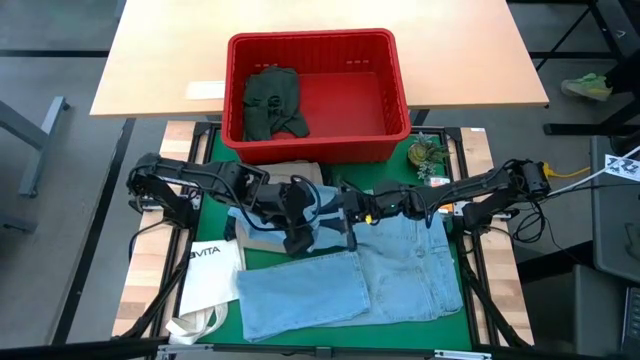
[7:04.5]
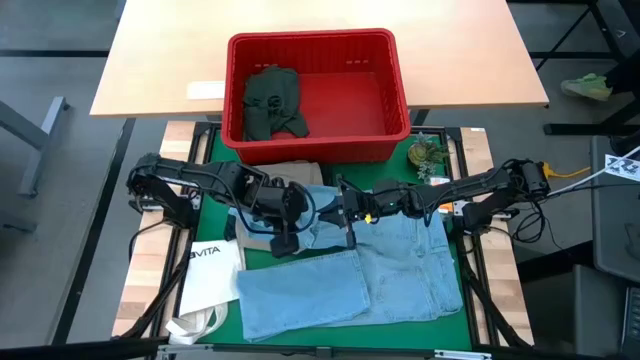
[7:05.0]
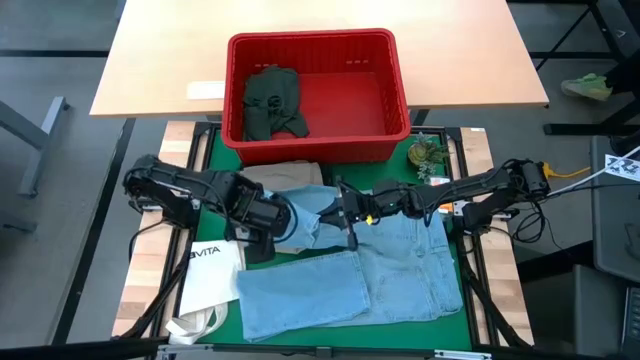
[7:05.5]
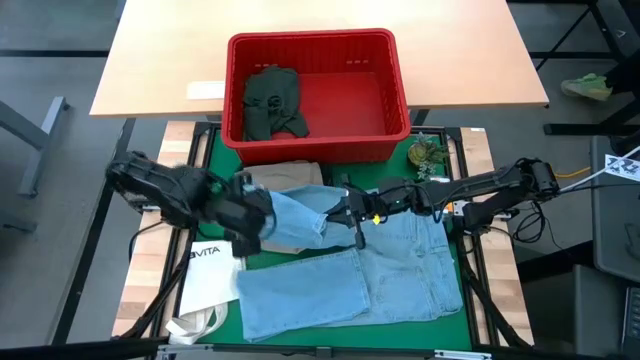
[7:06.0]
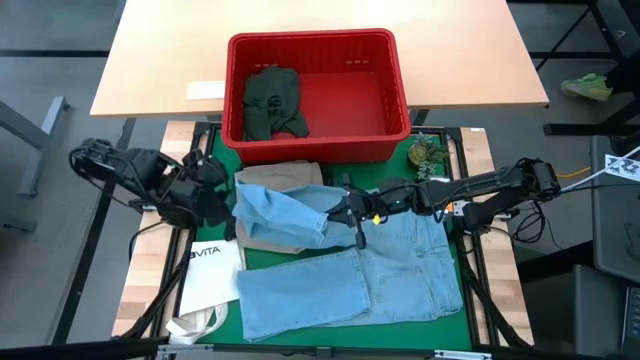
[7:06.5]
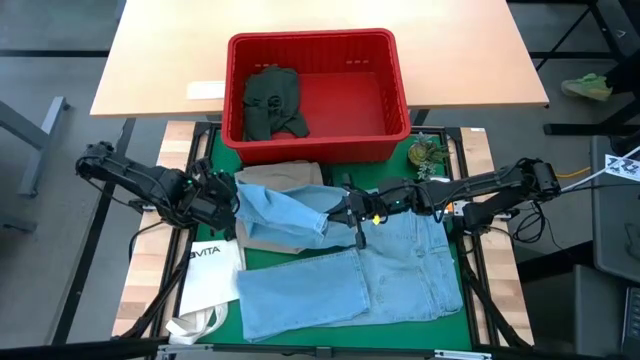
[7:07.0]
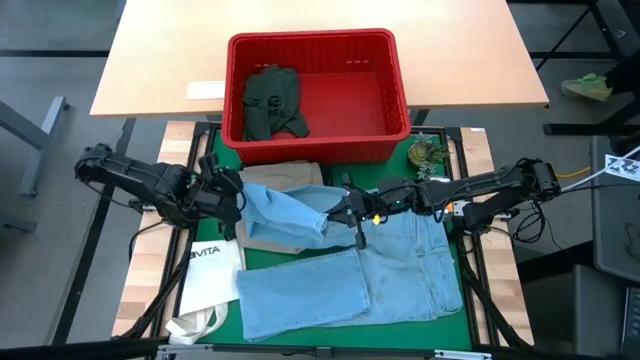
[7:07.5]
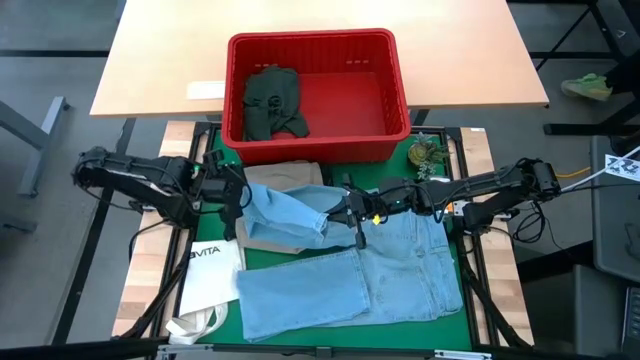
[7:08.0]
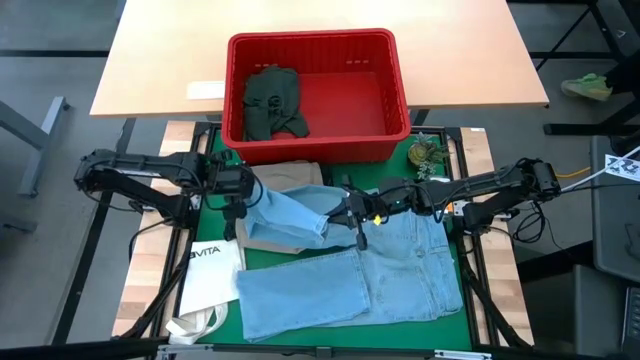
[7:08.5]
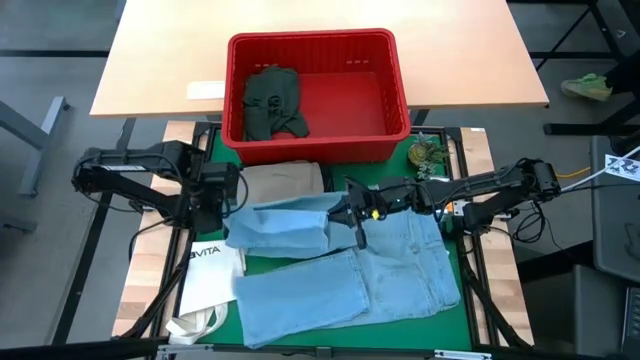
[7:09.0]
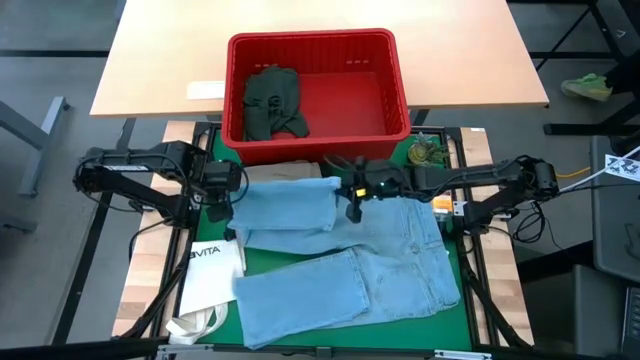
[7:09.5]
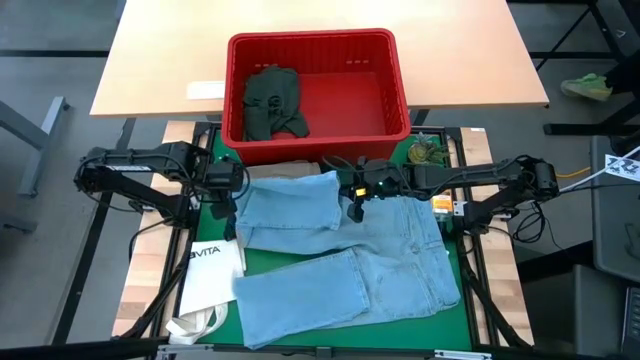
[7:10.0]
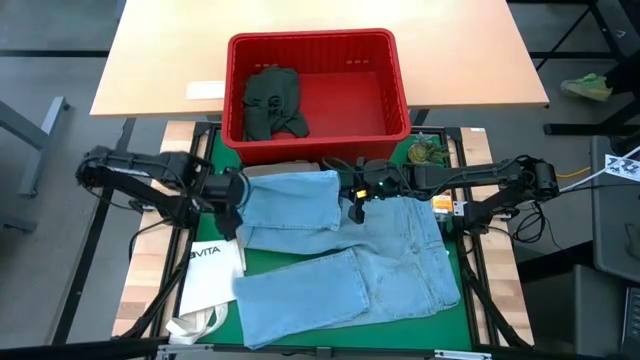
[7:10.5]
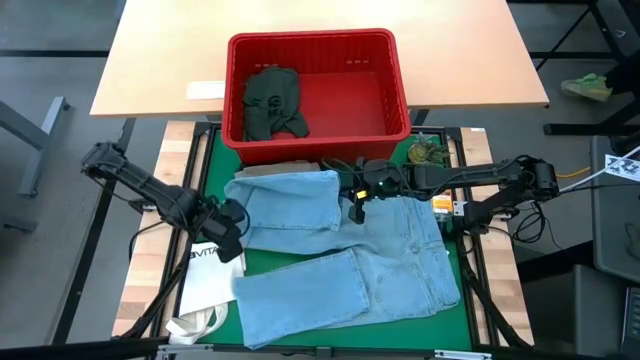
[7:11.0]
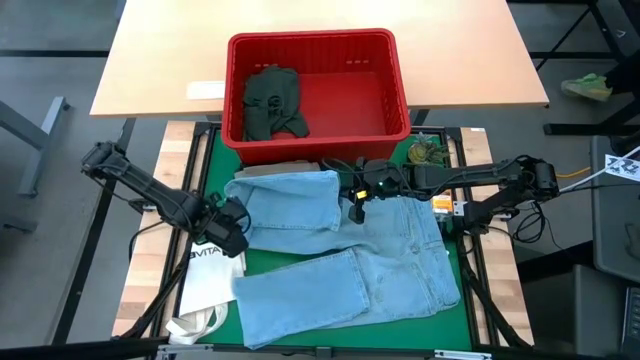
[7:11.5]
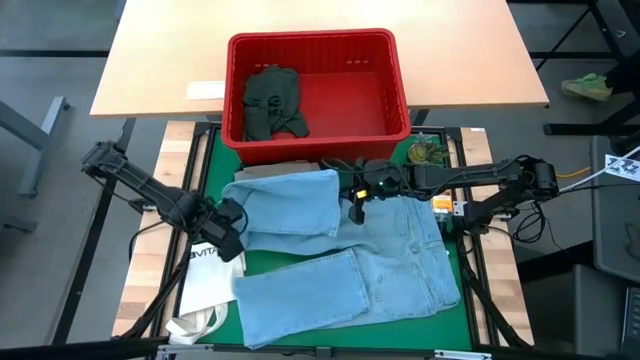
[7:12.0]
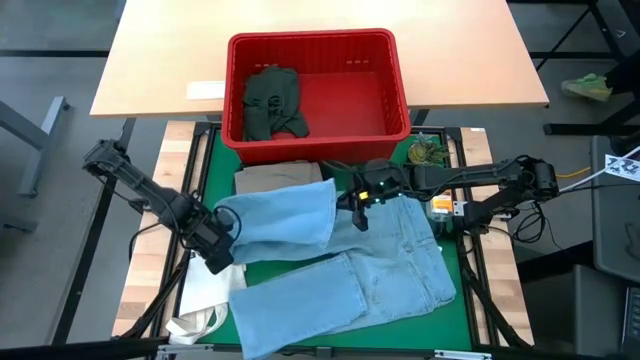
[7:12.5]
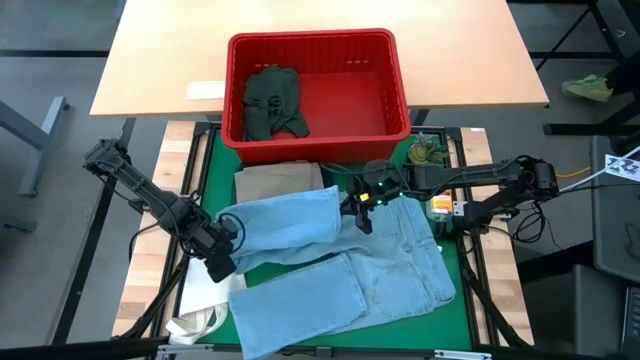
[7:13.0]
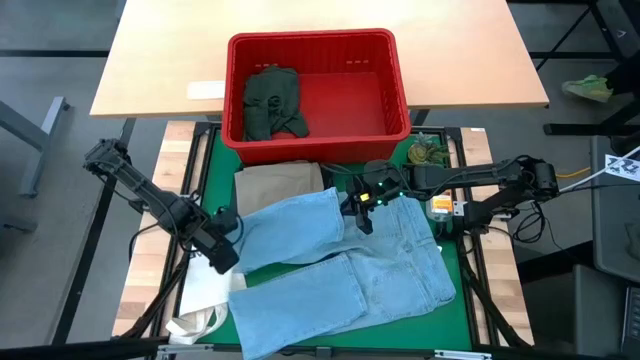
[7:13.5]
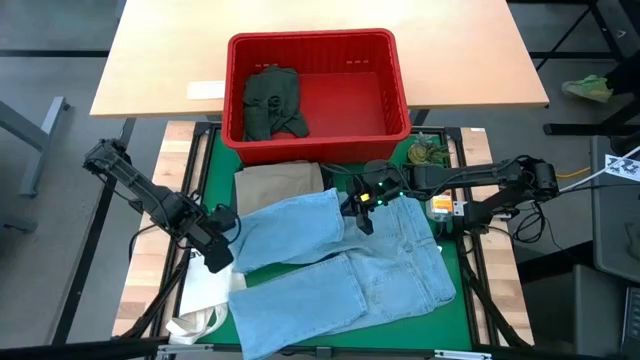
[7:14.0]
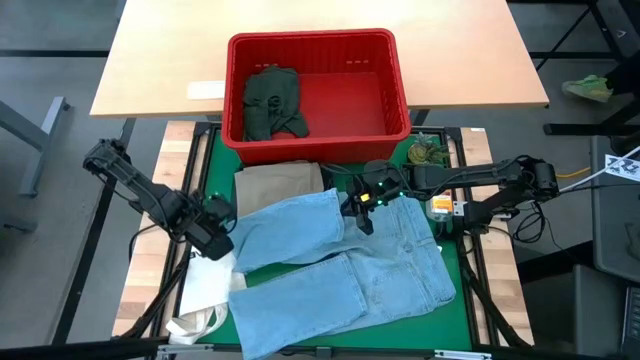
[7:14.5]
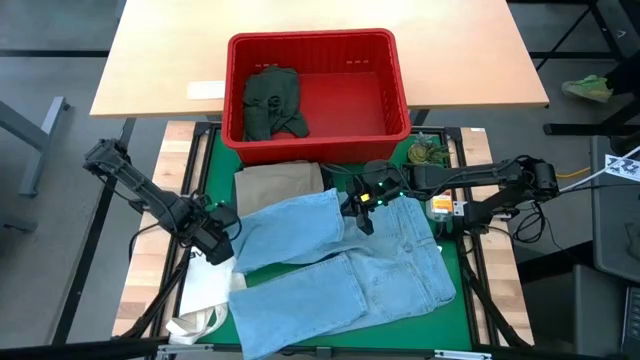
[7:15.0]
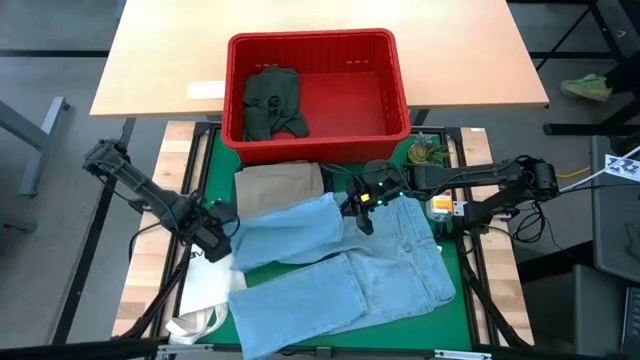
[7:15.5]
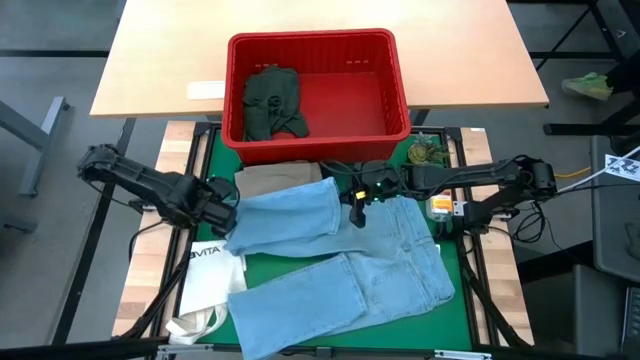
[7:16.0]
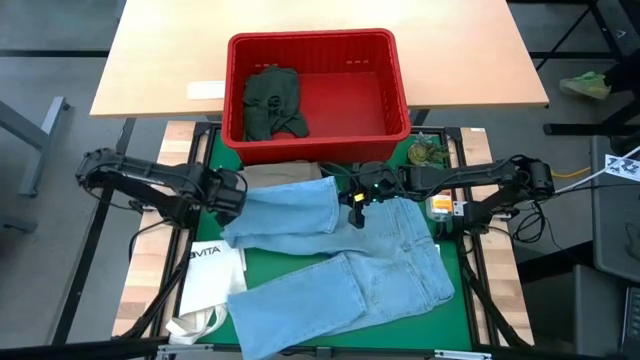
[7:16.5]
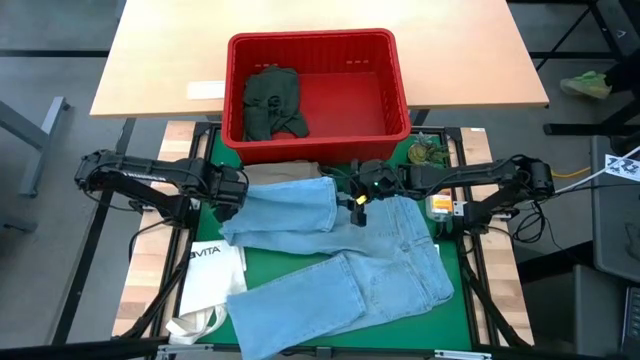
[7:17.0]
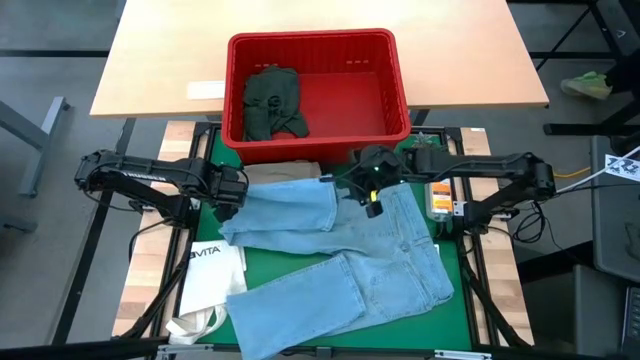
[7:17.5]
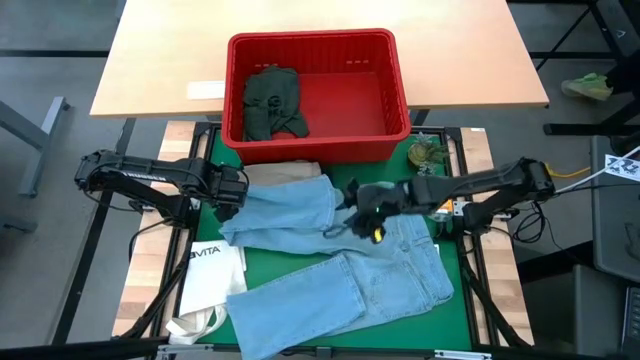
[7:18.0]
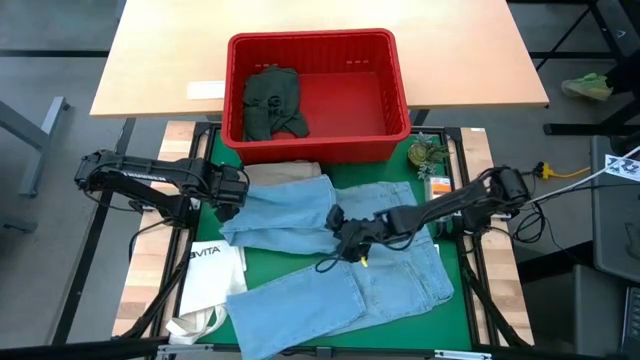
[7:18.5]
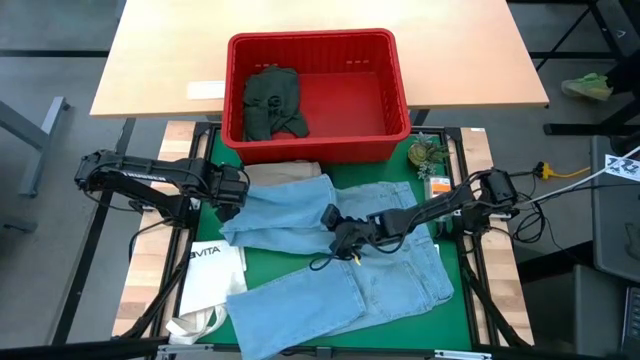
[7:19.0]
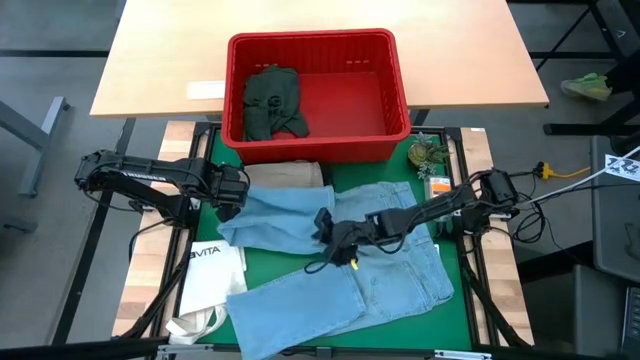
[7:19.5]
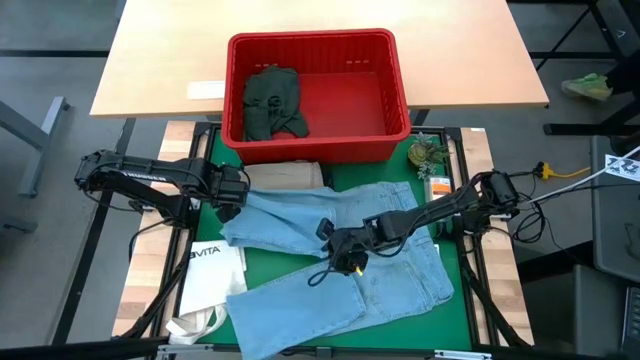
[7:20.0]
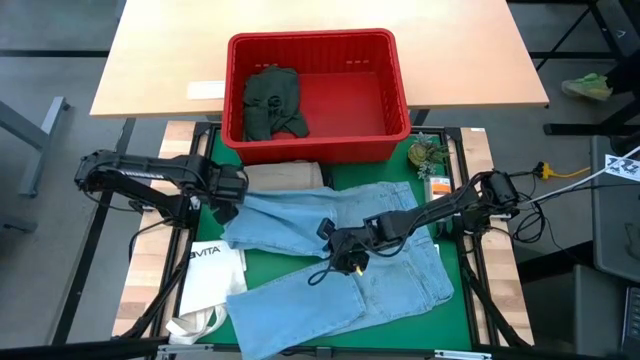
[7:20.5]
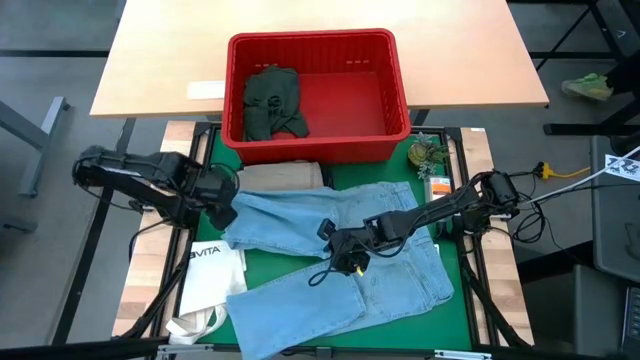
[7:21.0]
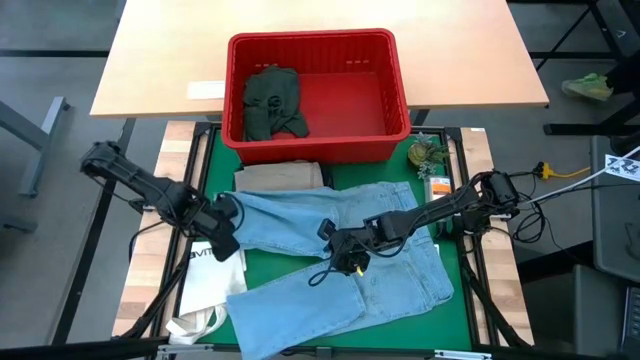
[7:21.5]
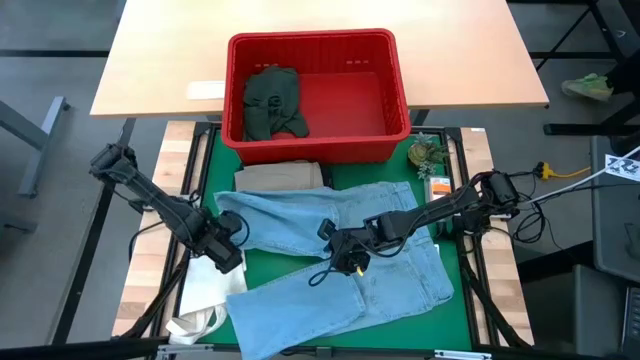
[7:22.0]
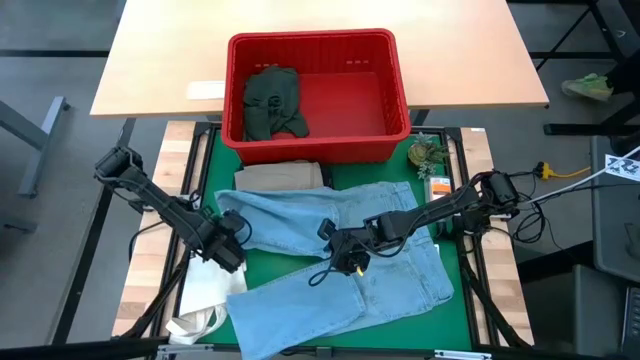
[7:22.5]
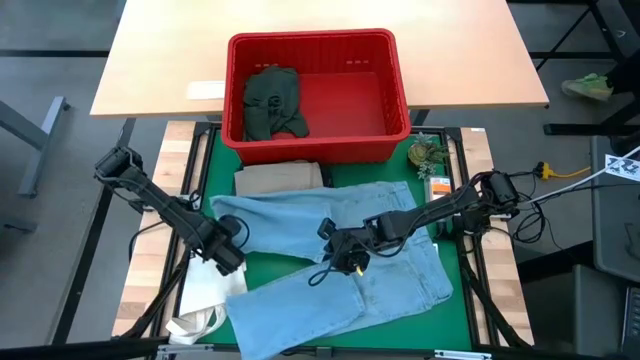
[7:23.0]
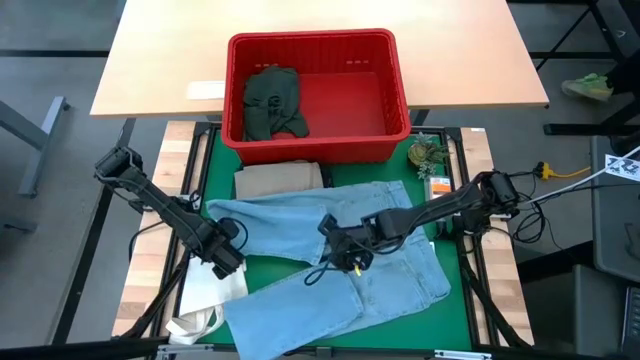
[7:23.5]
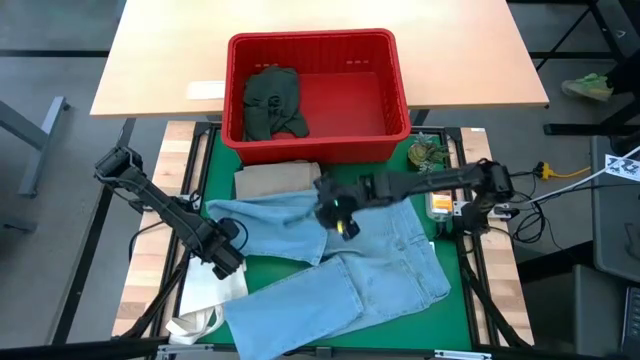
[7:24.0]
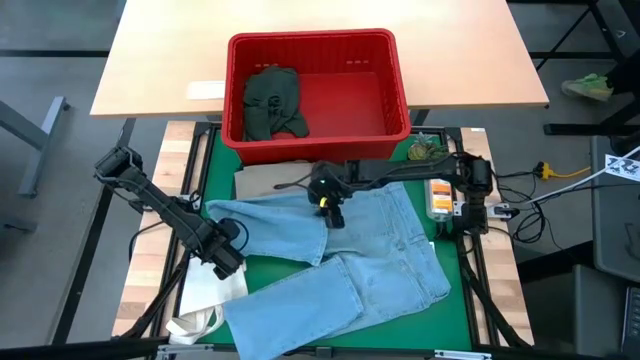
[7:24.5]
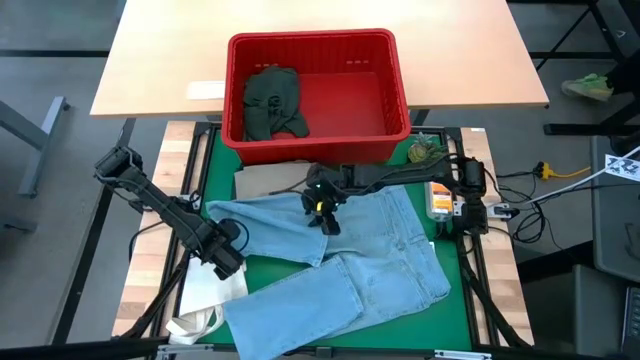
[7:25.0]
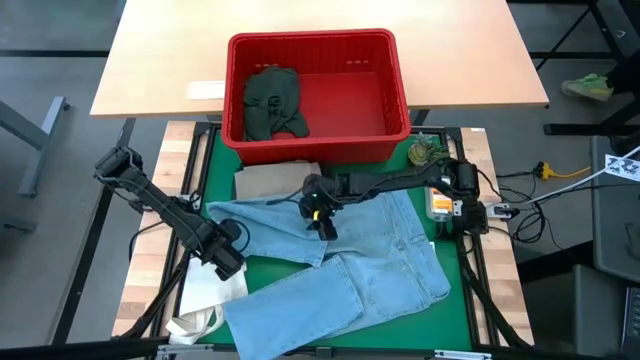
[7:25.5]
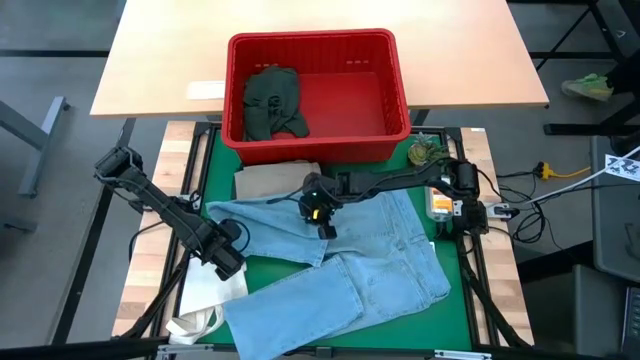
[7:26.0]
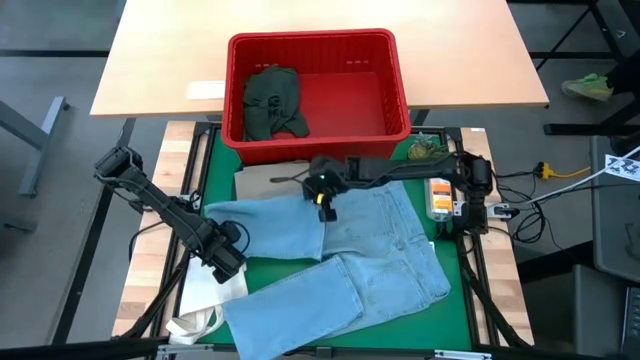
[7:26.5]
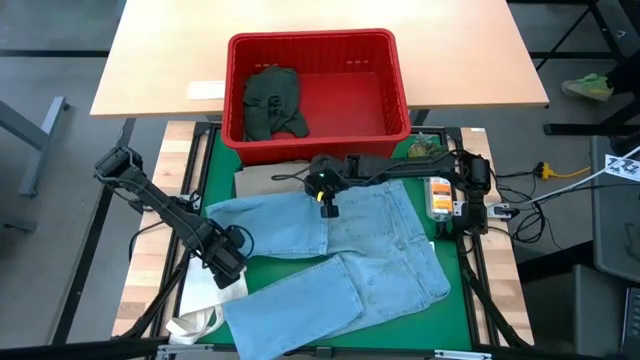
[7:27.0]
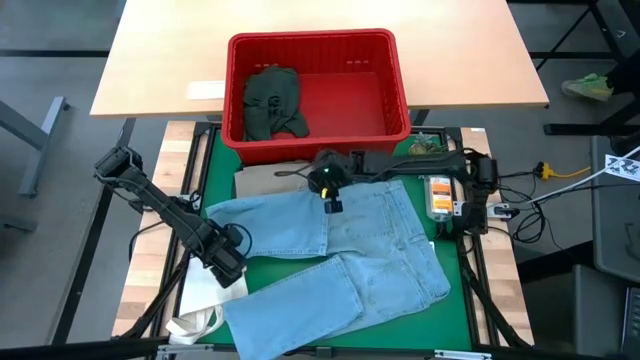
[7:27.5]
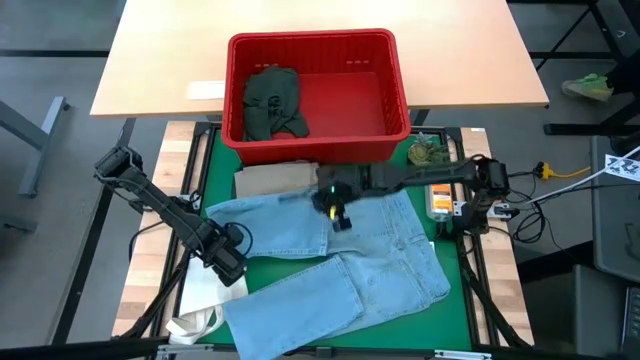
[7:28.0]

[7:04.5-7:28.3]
Task: Fold Laundry from Bin
Fold the light blue pants
